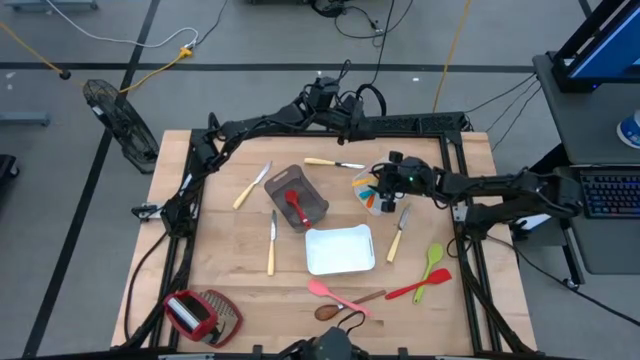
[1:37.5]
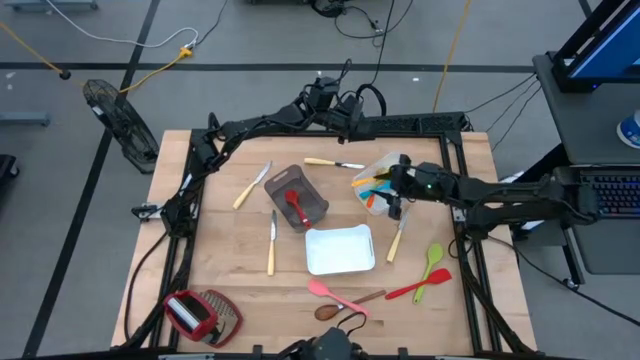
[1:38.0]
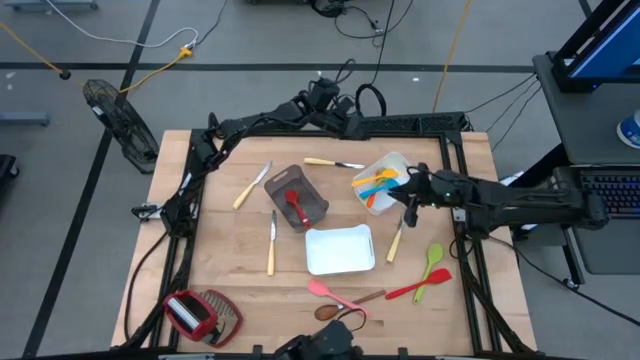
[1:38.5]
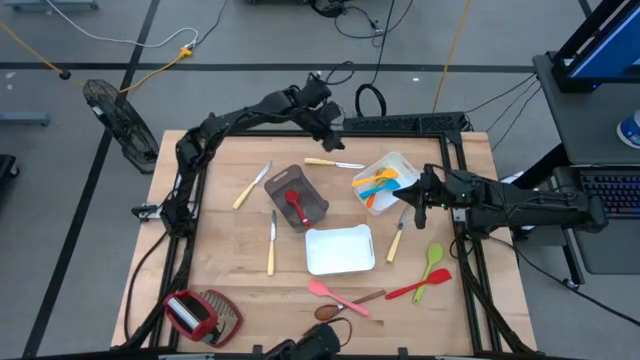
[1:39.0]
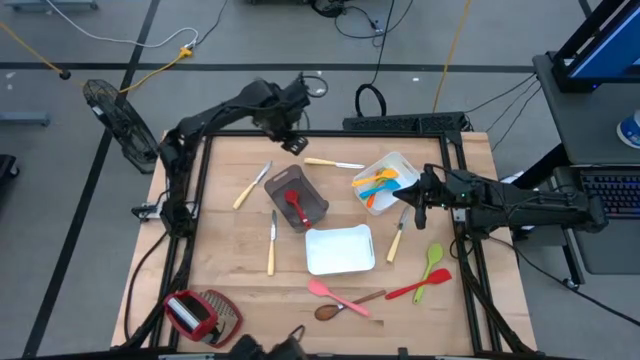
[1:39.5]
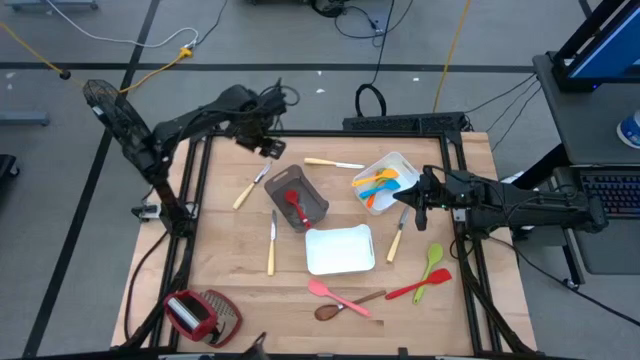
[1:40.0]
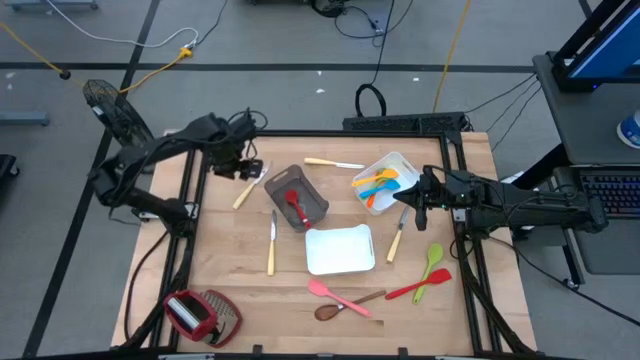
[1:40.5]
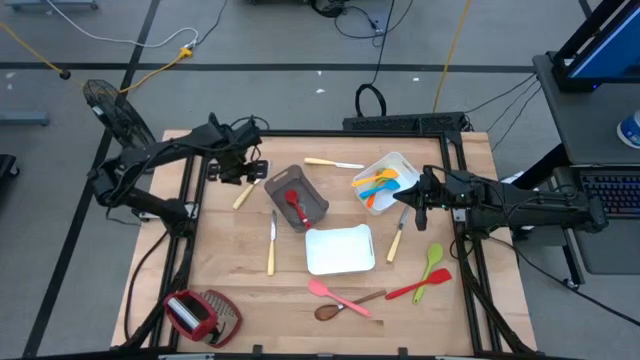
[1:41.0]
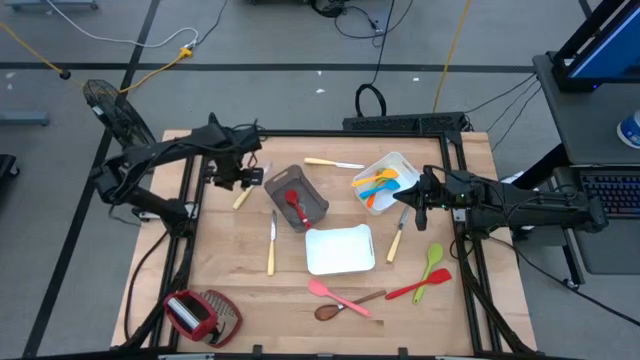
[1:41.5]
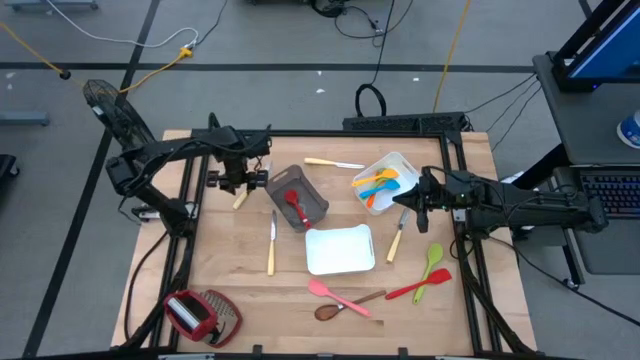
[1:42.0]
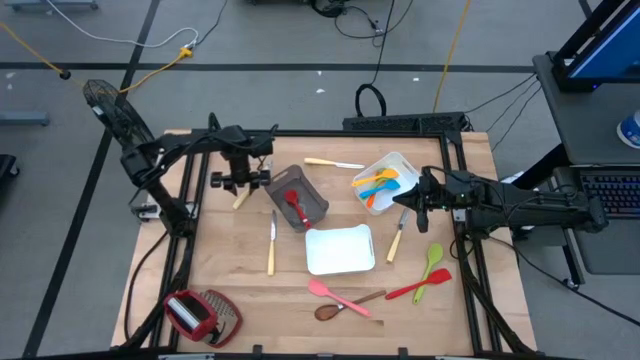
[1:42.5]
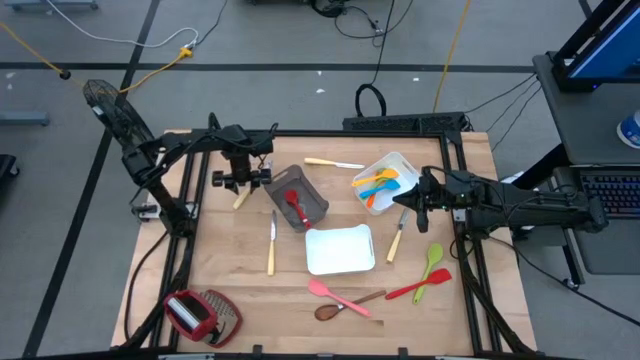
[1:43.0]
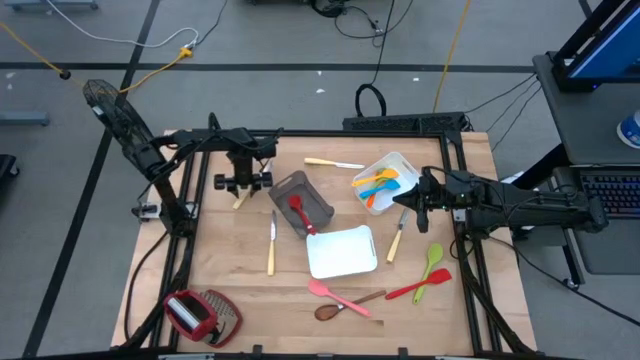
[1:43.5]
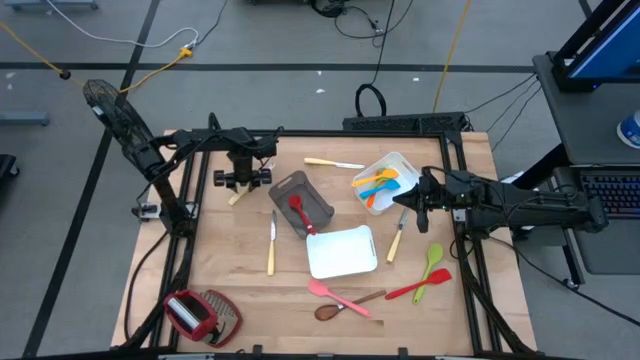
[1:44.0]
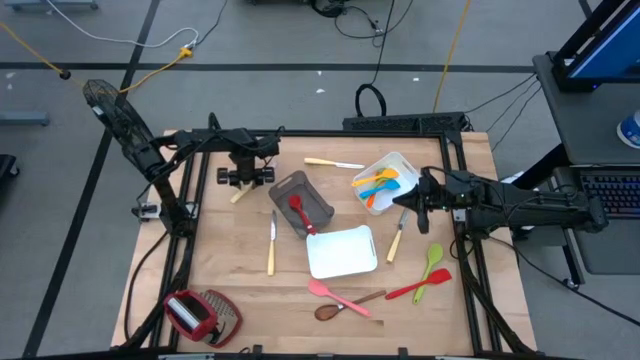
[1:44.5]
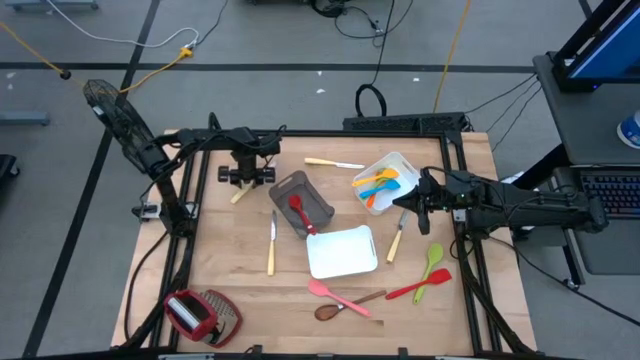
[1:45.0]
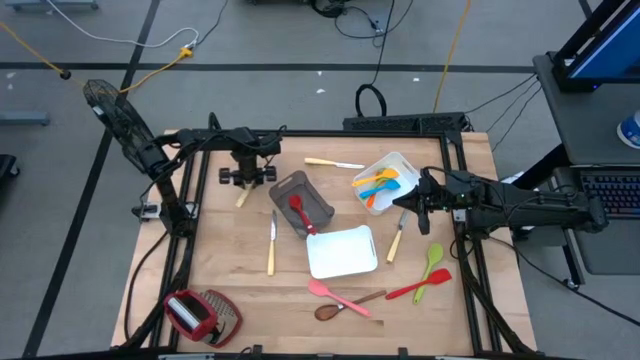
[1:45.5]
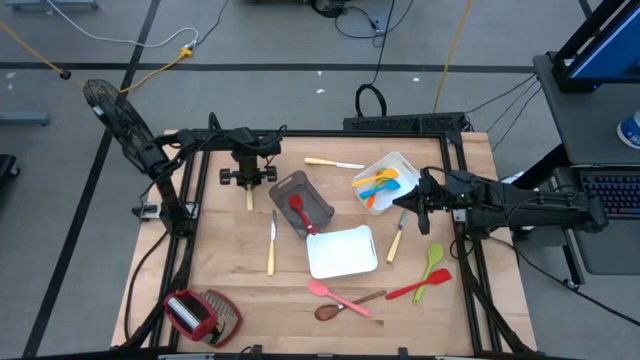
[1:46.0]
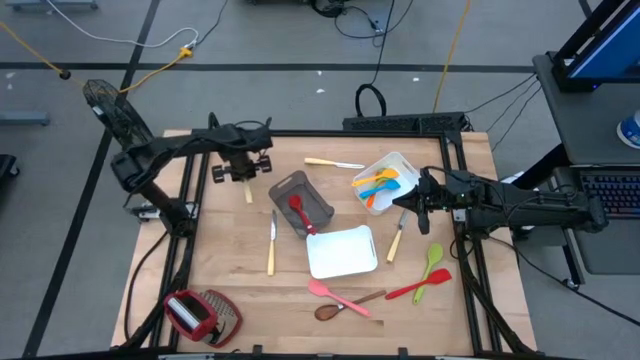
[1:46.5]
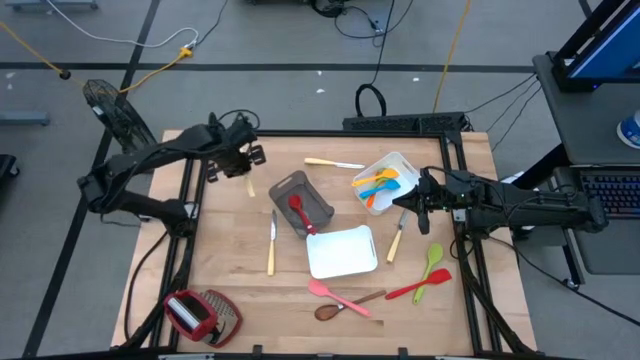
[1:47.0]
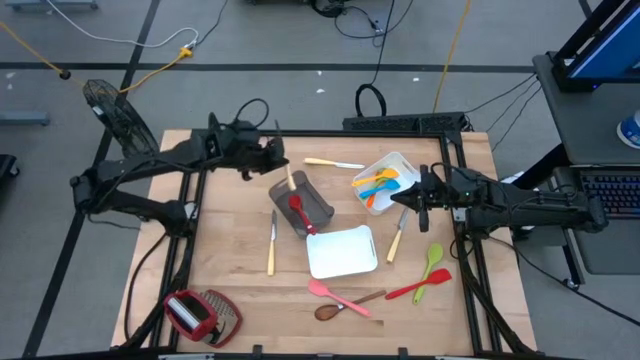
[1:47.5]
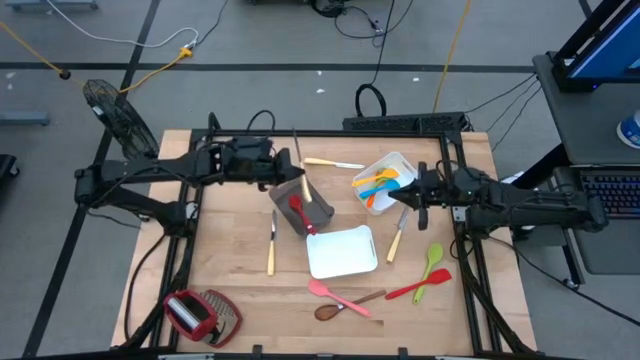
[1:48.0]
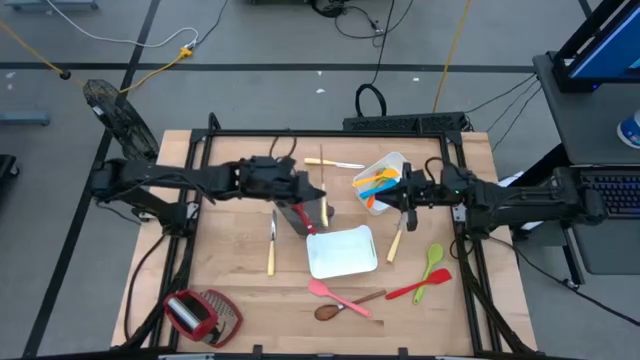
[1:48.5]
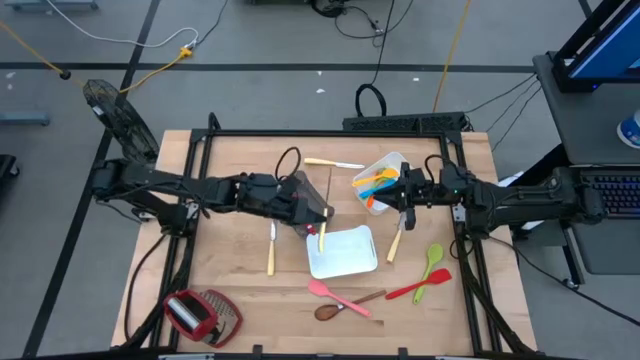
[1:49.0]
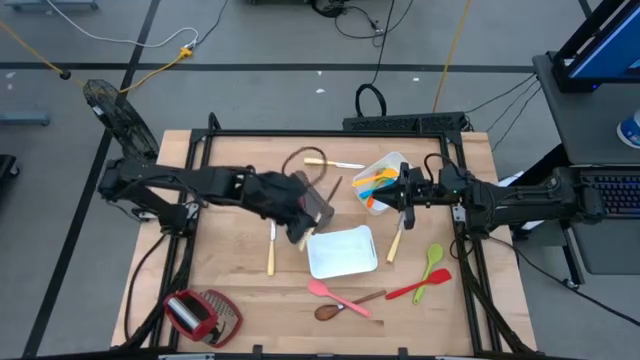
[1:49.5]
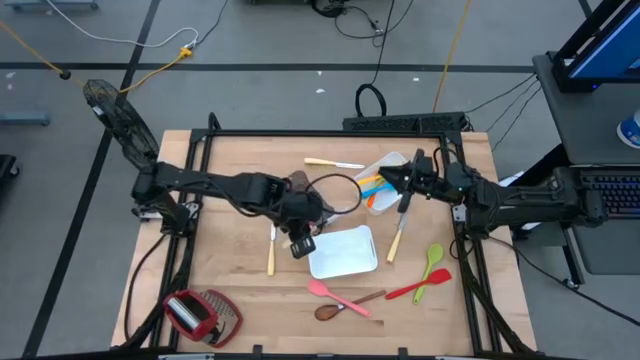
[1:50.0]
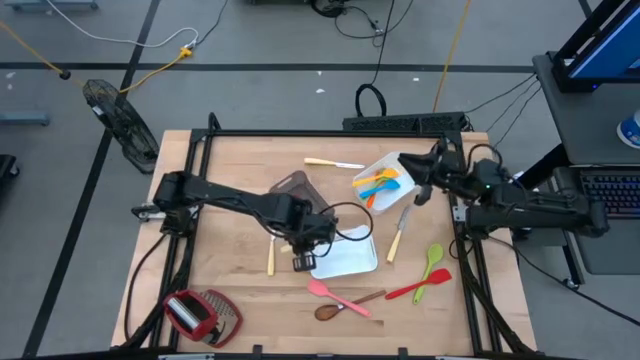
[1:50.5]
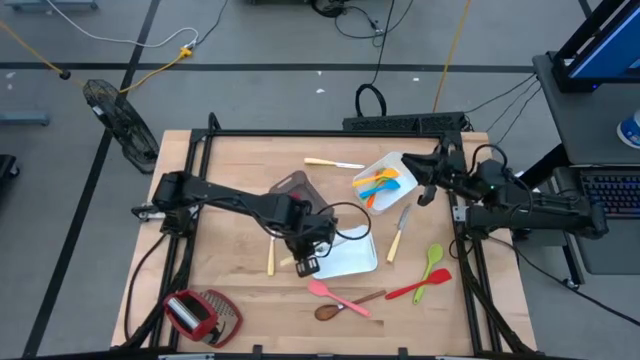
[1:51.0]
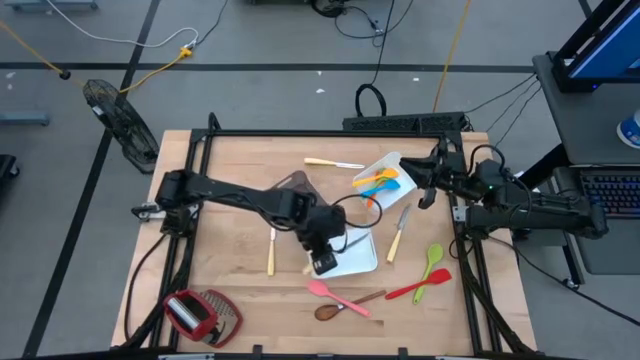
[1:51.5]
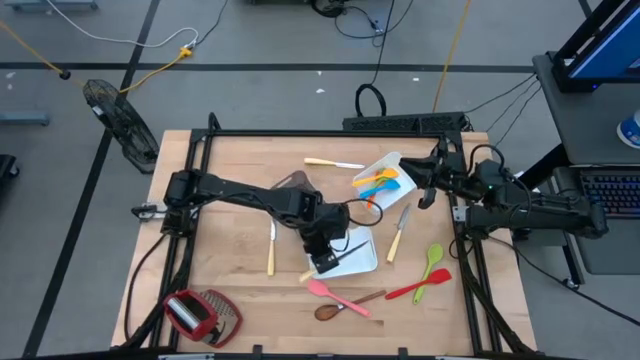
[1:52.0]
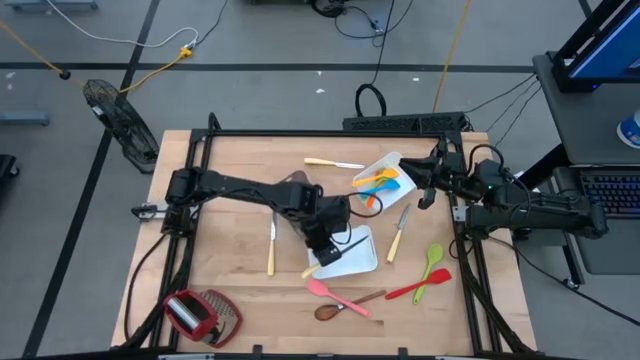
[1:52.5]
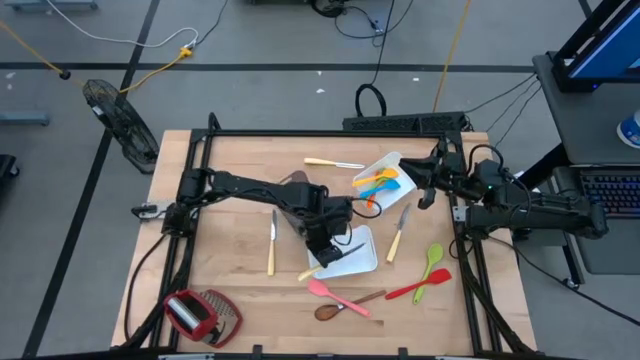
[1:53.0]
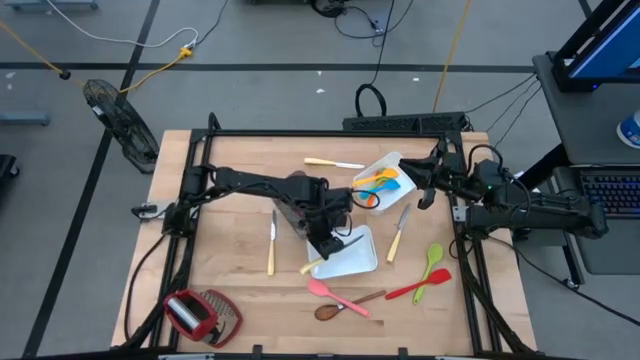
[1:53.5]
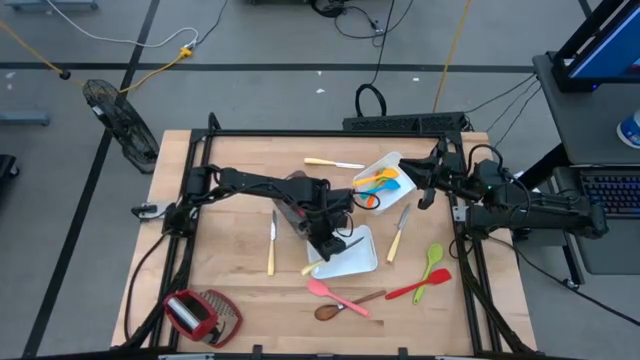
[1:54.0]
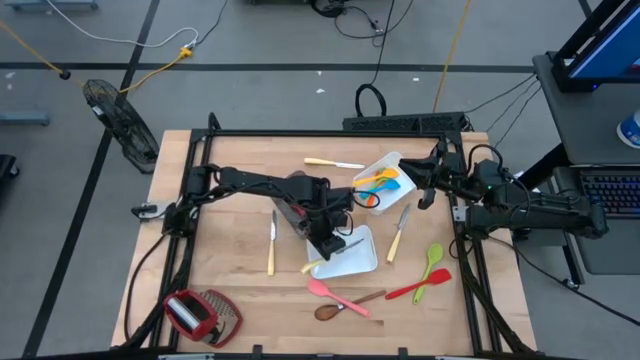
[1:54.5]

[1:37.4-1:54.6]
Task: Pick & Place Kitchen Items
Put the yellow table knife into the bottom white bin
